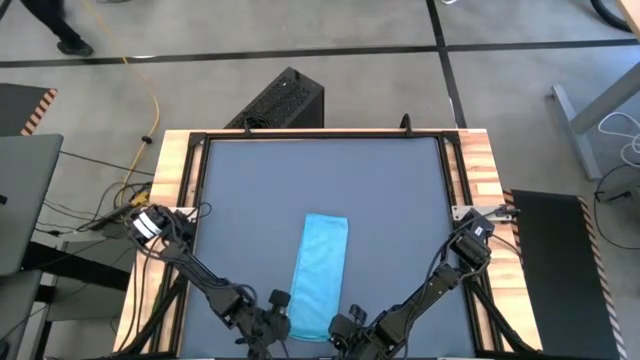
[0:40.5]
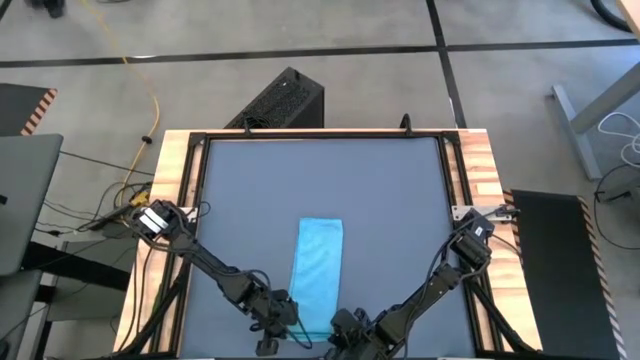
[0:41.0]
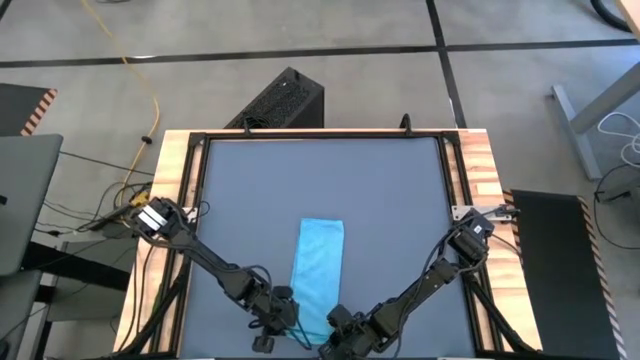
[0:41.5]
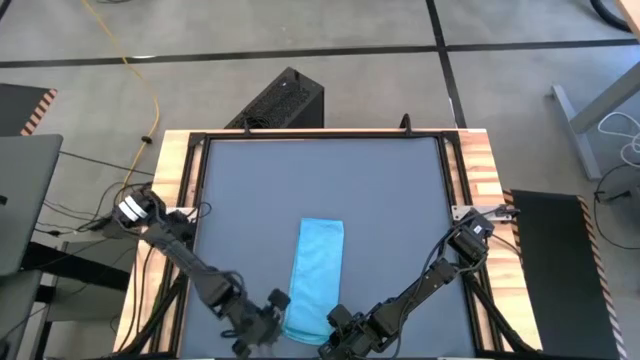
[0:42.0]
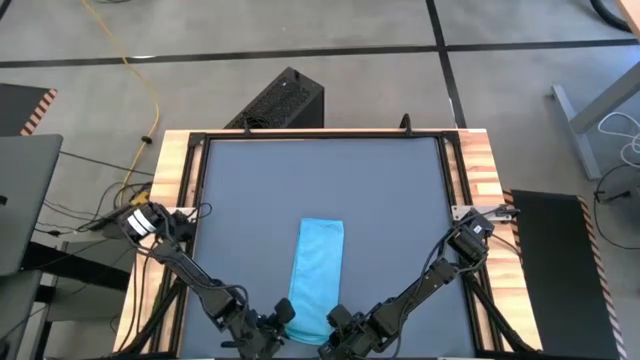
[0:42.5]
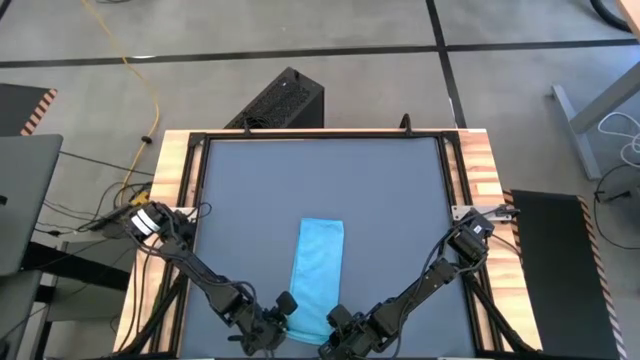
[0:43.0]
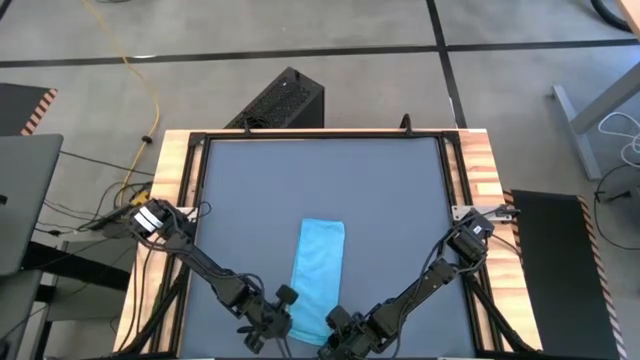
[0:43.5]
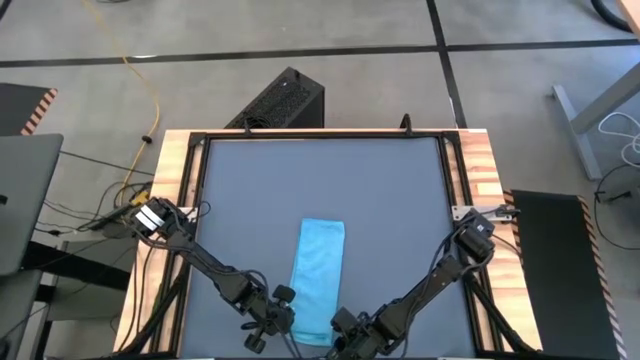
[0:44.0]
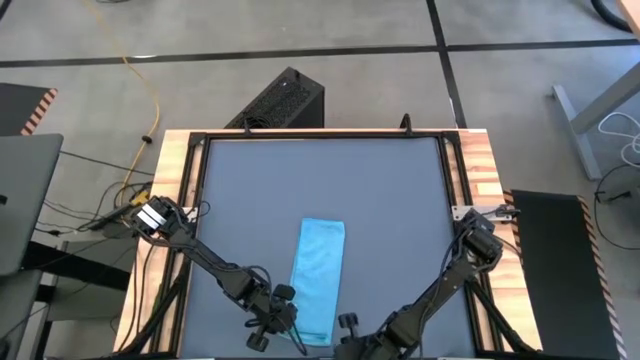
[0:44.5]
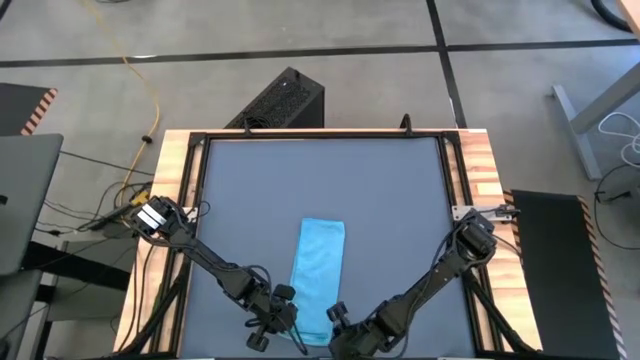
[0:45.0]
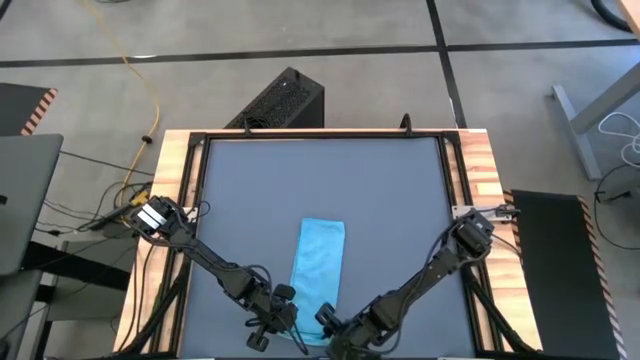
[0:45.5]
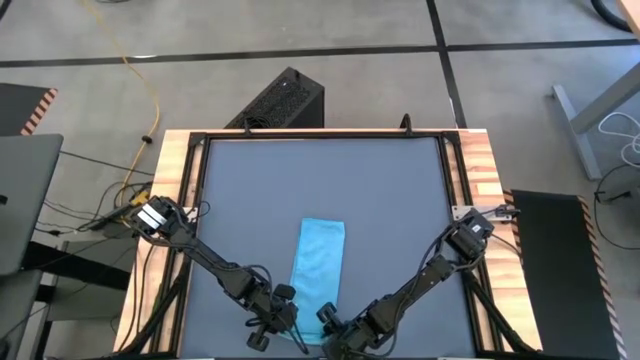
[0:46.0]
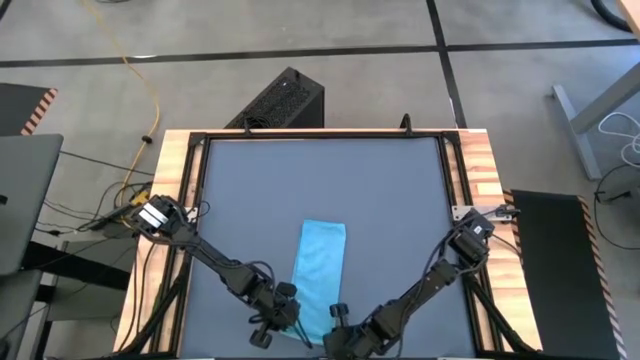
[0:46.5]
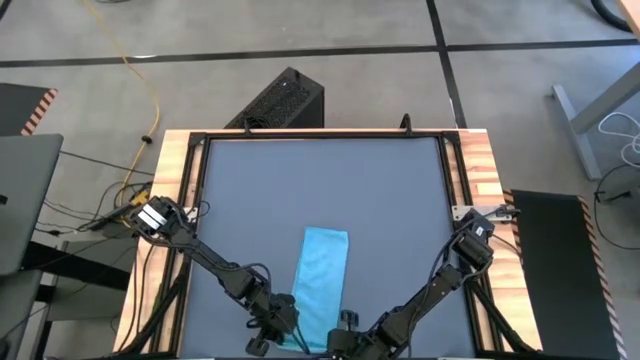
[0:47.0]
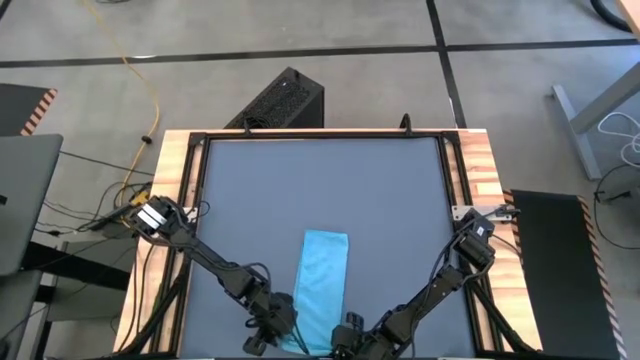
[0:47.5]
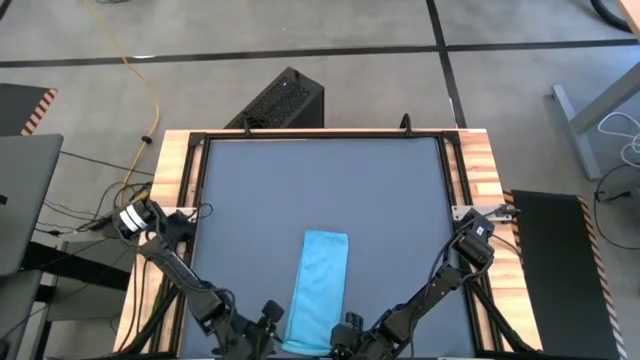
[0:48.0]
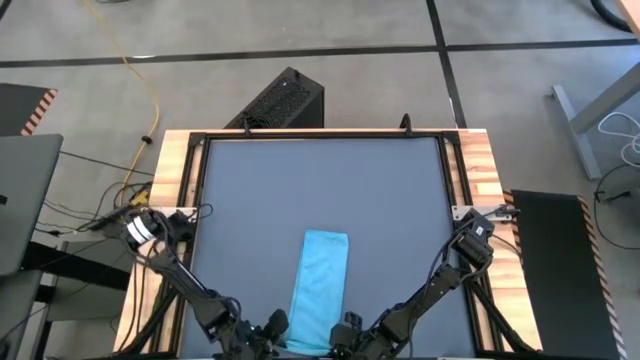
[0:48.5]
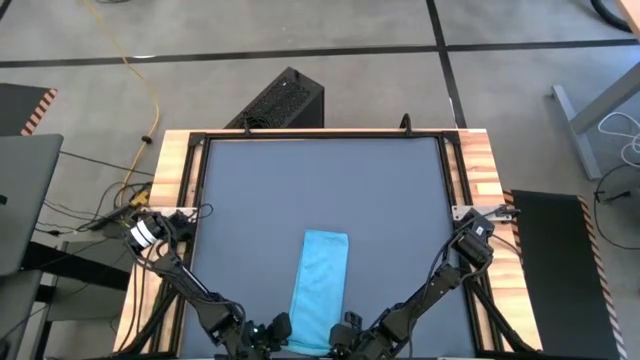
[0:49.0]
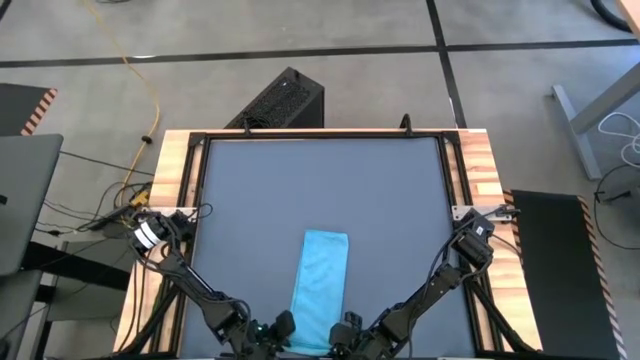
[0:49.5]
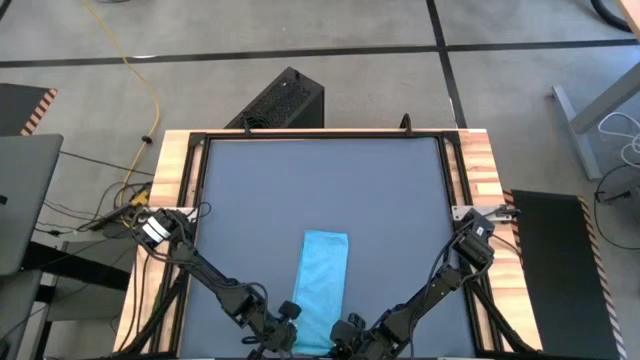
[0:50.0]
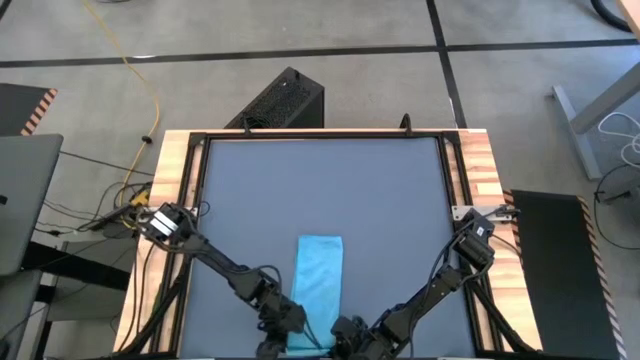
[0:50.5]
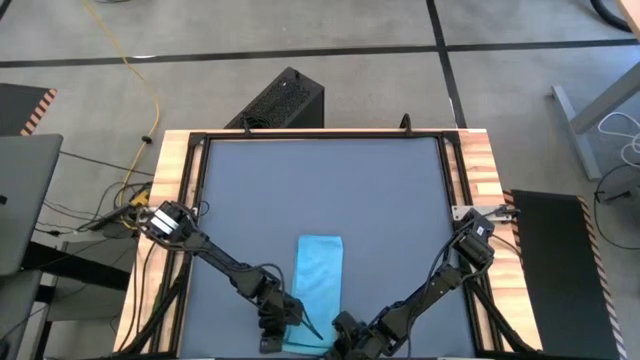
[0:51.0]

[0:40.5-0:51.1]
Task: Roll towel
Roll the blue towel

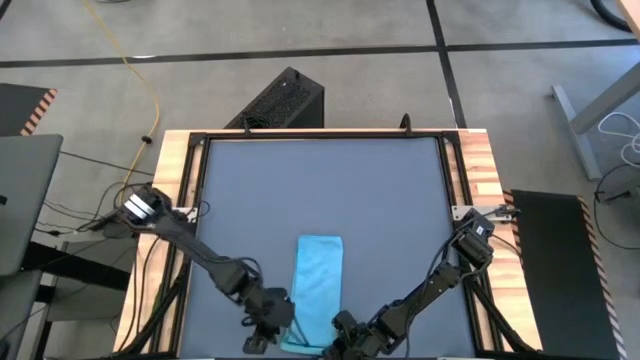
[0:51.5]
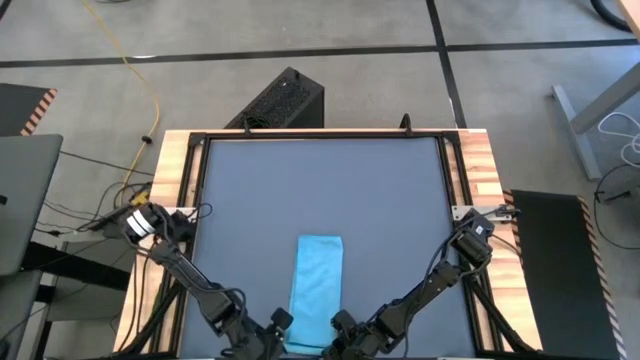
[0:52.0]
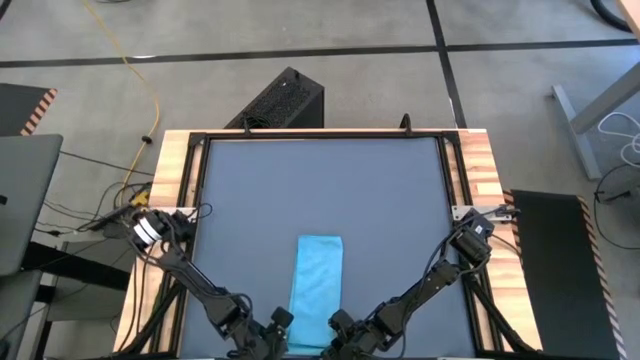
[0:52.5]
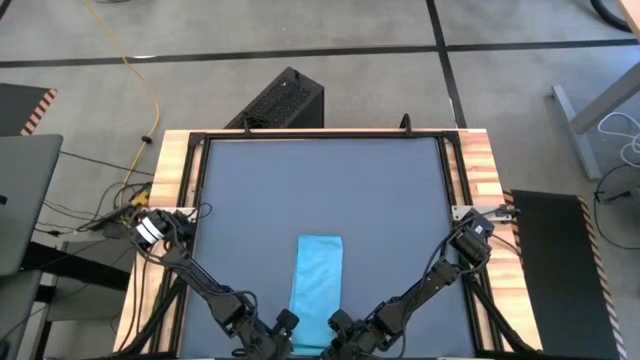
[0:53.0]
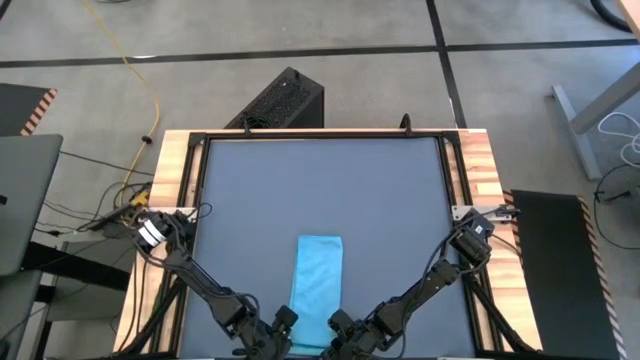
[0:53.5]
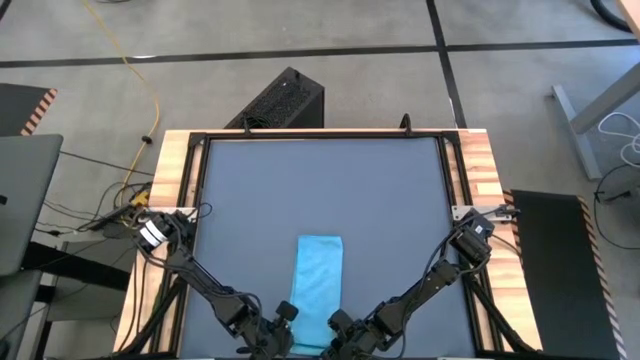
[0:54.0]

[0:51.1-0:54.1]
Roll the blue towel

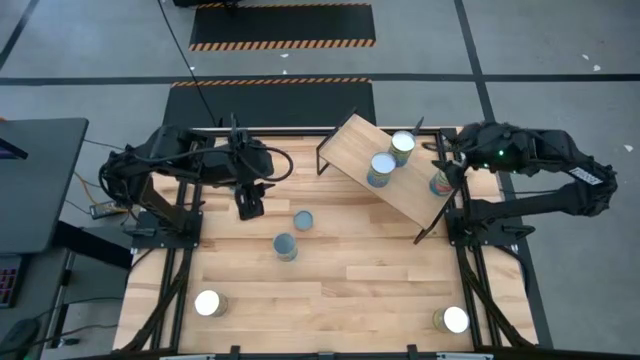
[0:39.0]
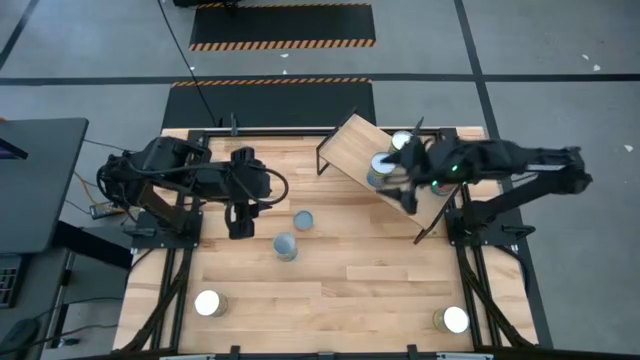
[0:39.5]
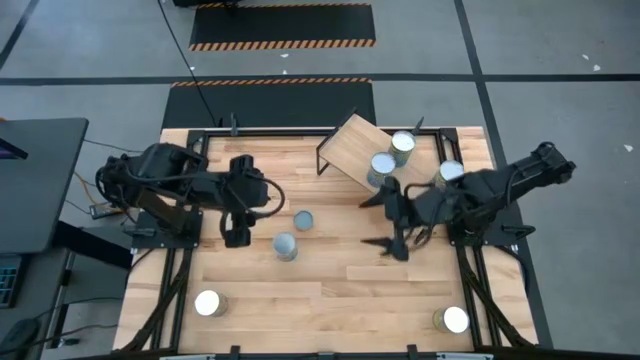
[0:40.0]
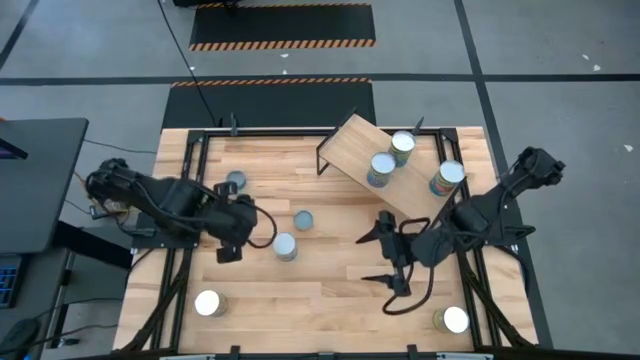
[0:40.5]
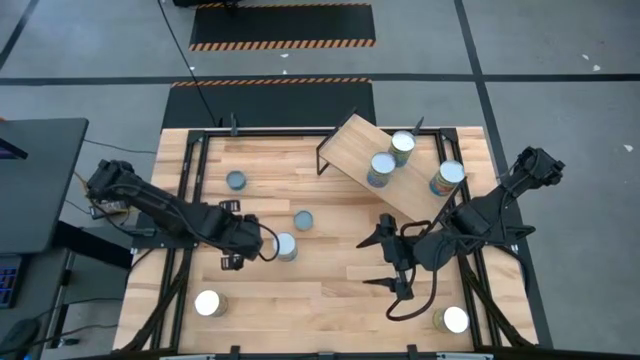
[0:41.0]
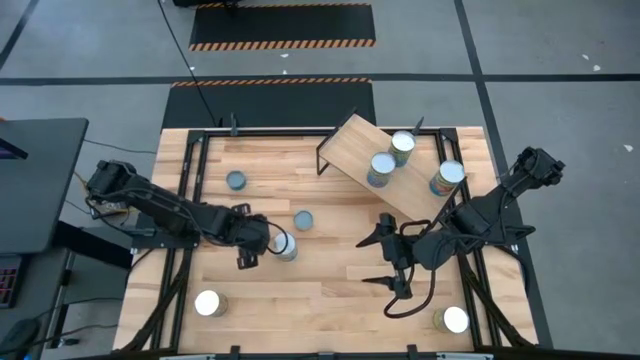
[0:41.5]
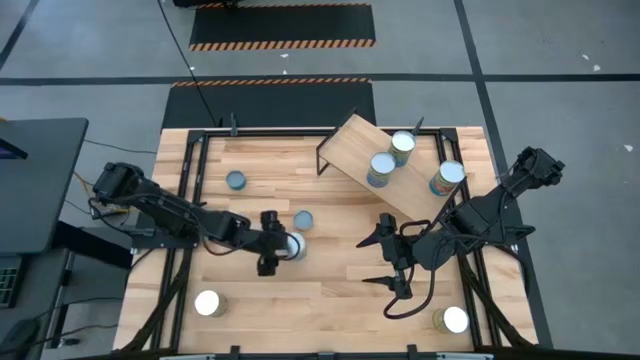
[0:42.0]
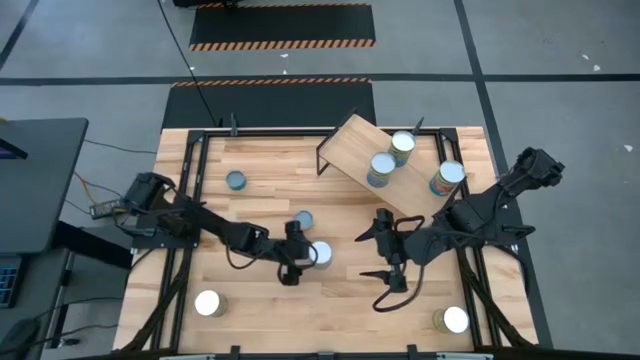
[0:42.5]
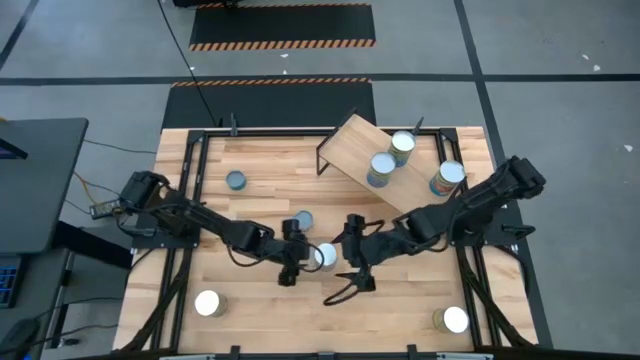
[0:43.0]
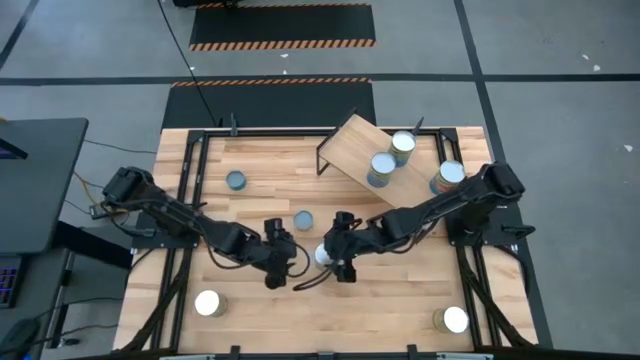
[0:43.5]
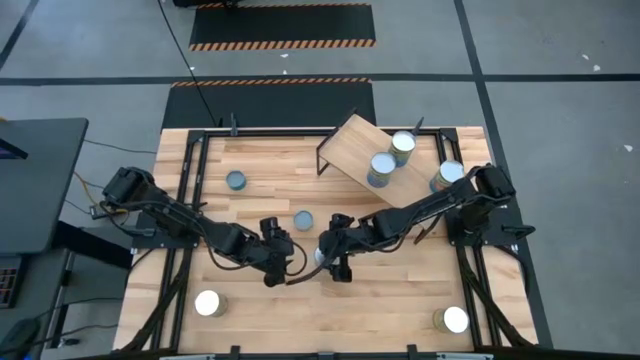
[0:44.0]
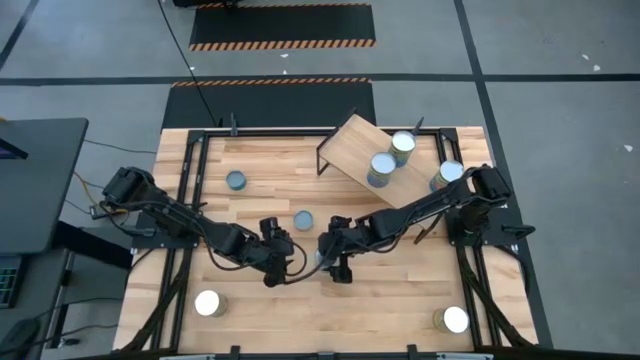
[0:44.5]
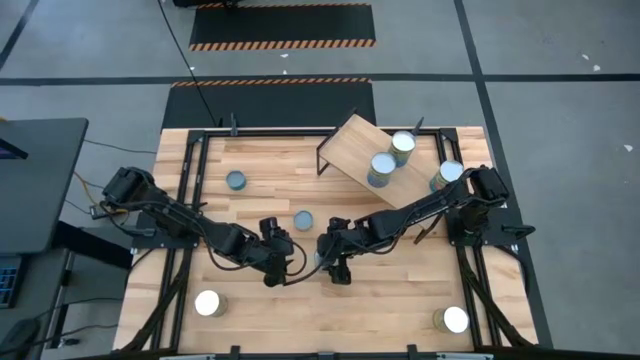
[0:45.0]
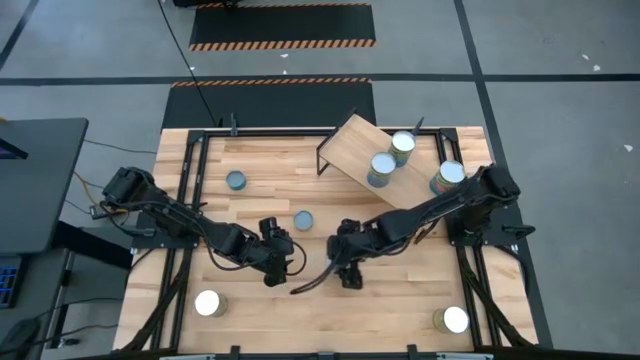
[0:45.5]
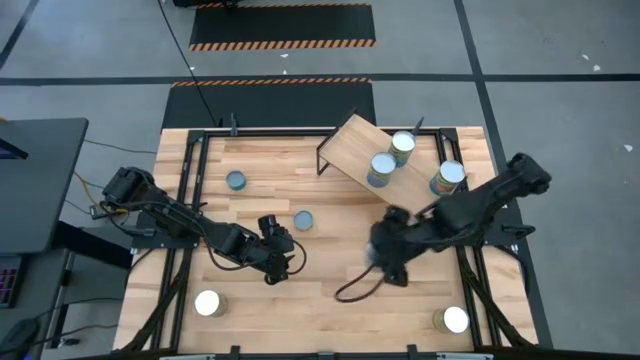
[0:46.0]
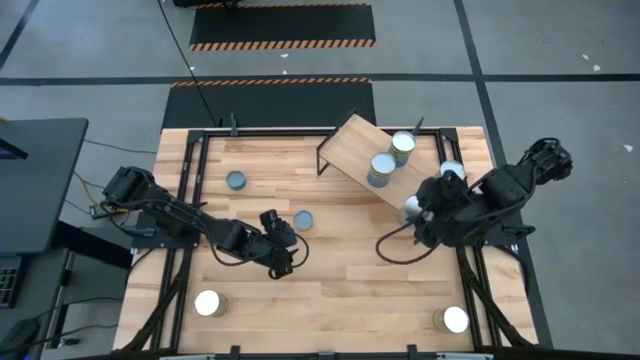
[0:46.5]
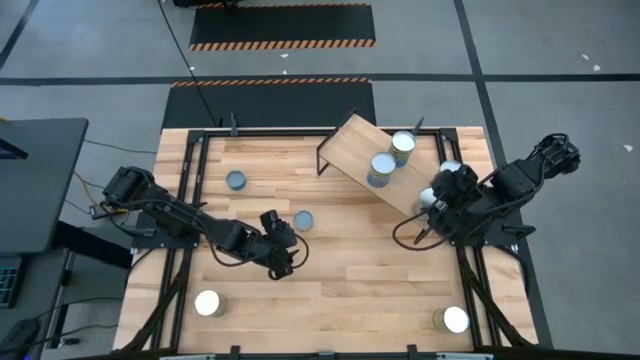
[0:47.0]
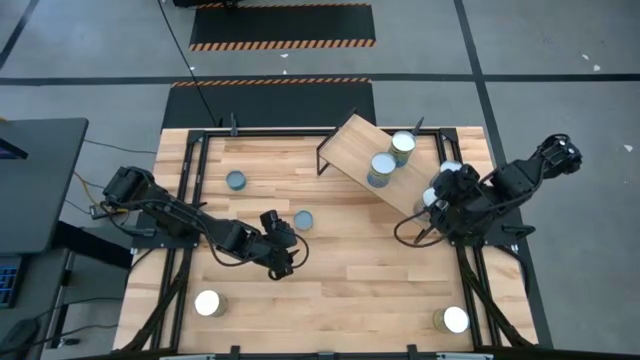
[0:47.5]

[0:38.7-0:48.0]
Task: Pick and place cans onto a shelf
Put the canned tomatoes on the shelf
